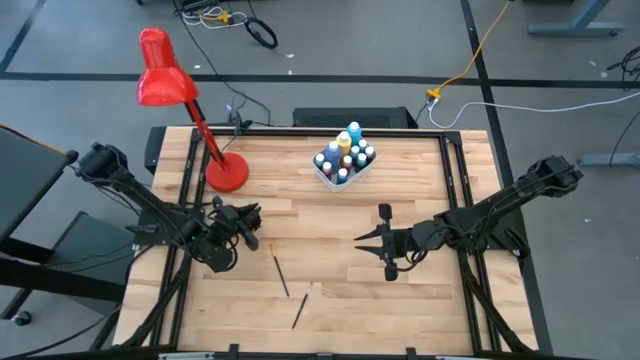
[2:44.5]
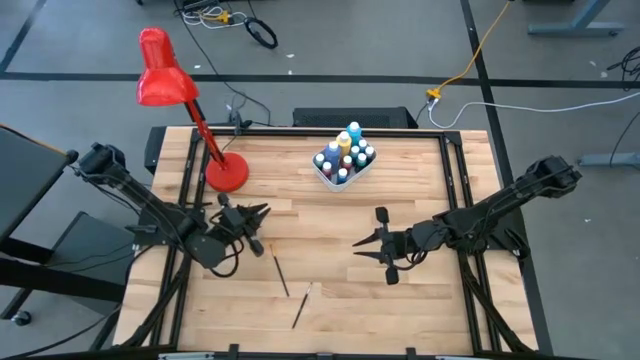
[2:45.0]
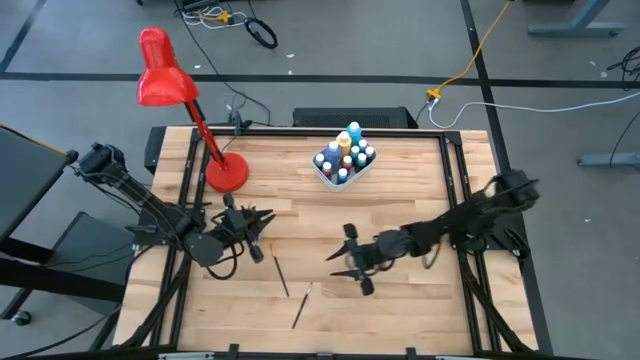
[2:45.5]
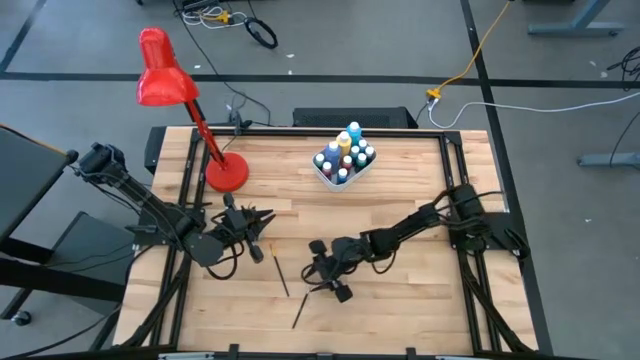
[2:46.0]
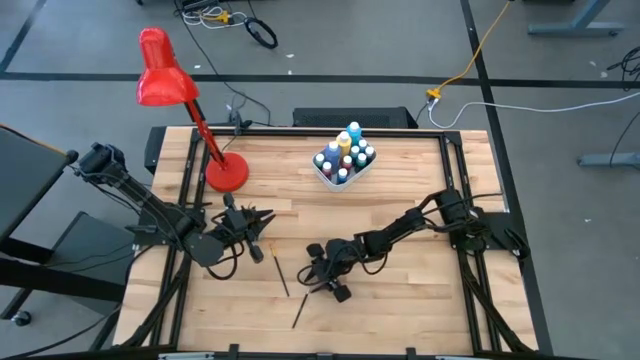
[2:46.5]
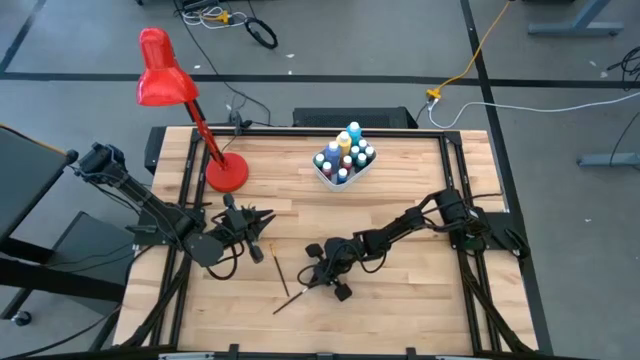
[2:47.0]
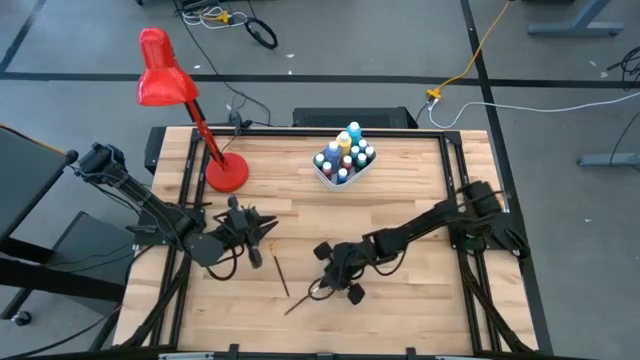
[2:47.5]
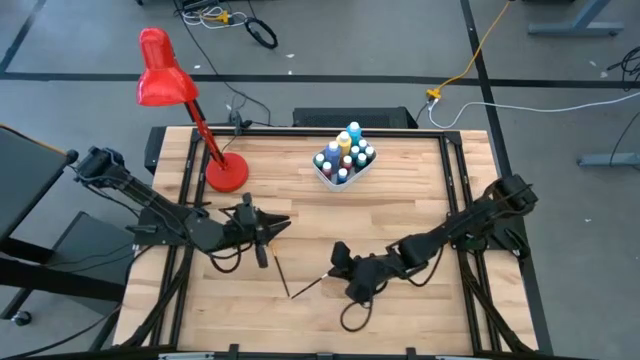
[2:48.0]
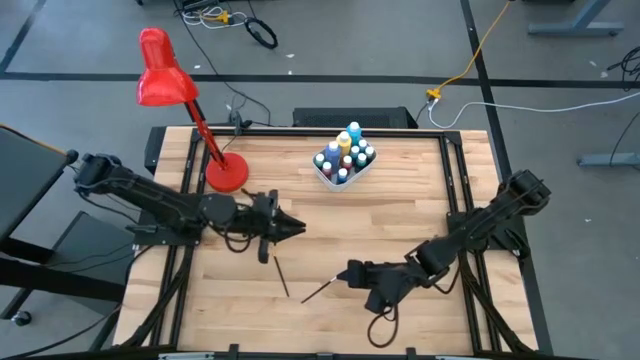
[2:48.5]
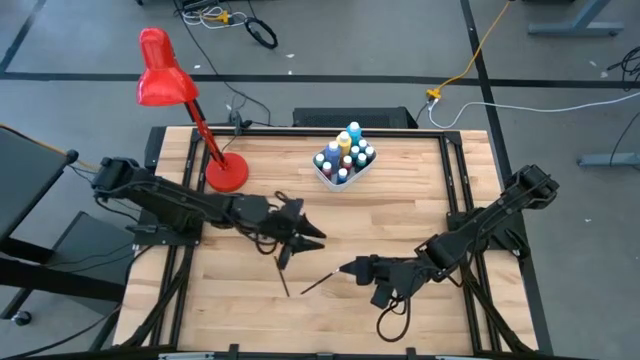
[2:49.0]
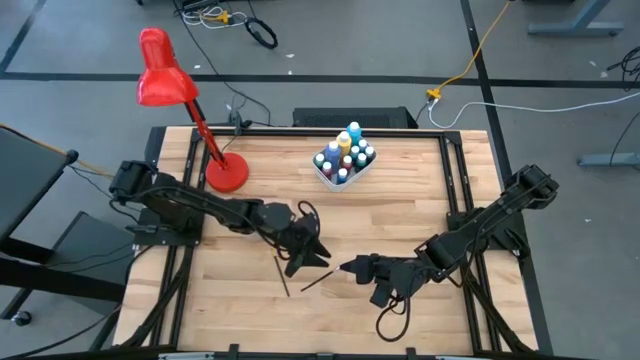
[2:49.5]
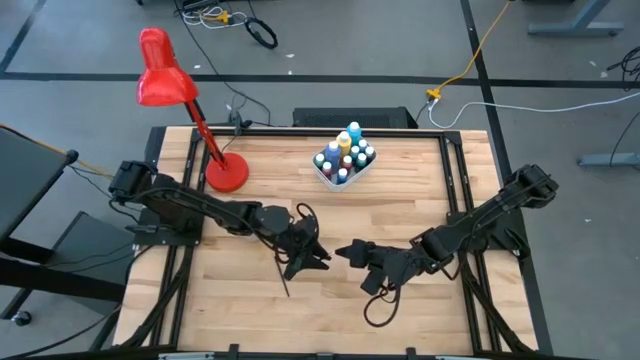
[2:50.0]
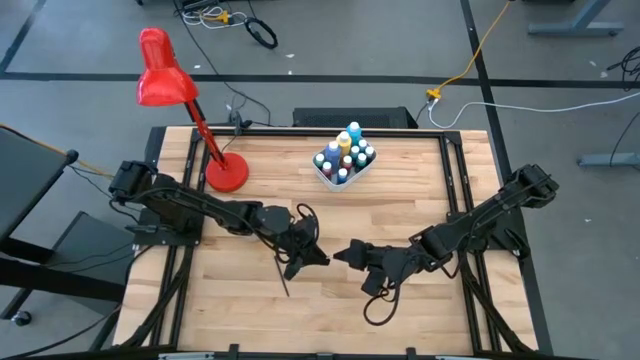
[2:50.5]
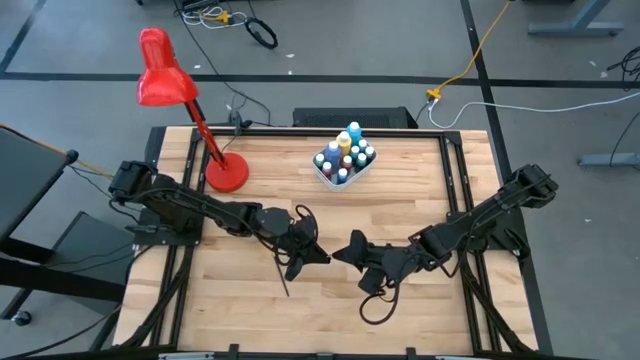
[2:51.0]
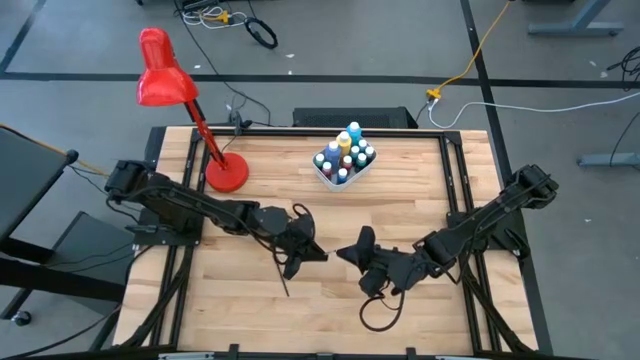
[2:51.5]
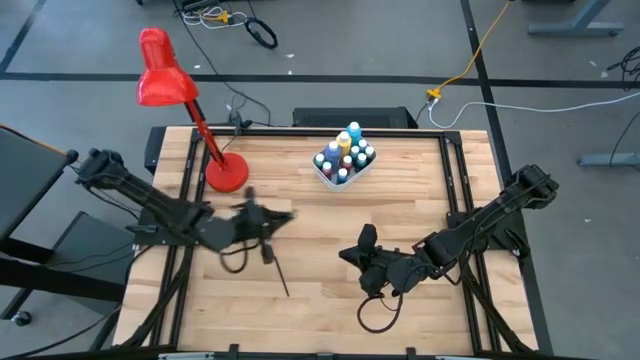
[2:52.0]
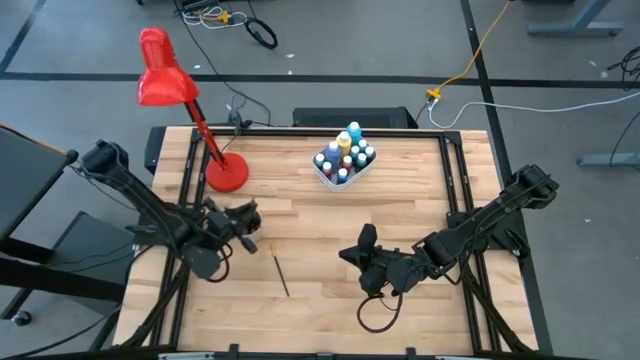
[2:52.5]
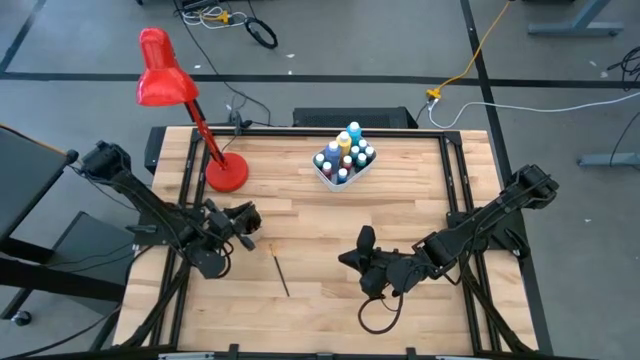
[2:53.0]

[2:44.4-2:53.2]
Task: Pick & Place Paint Supplies
Put the silver paint brush into the white cup

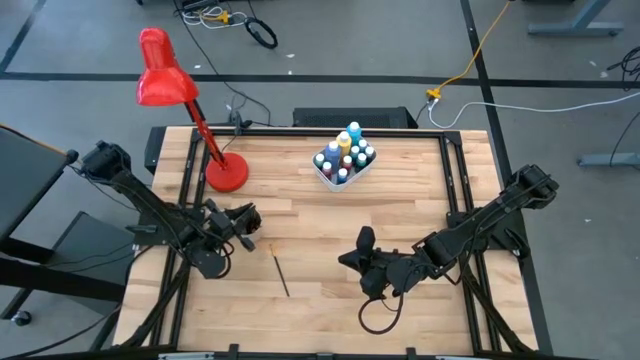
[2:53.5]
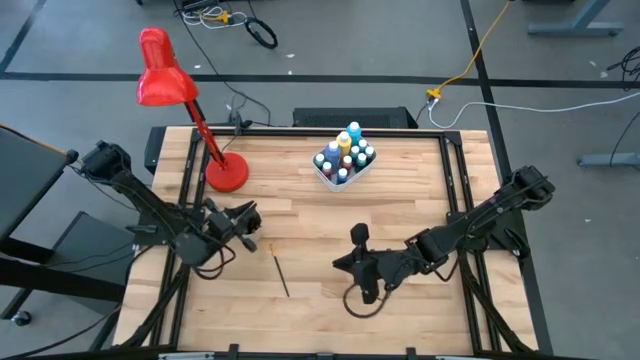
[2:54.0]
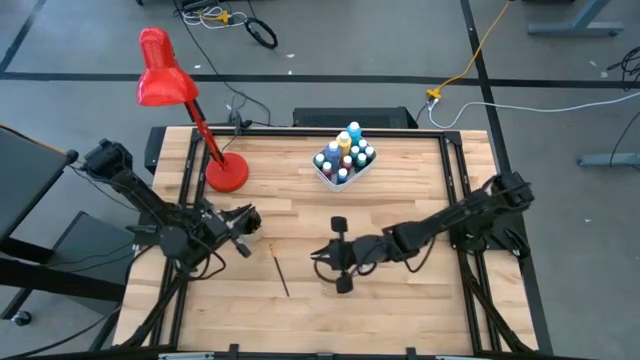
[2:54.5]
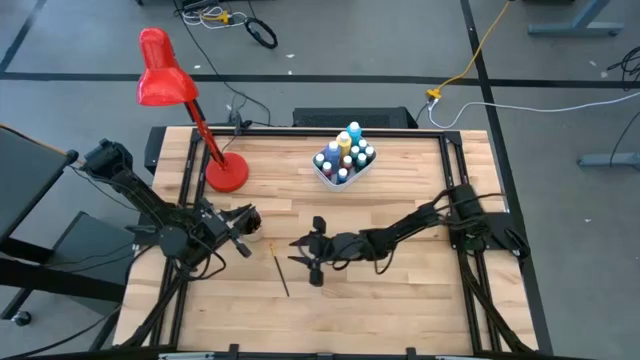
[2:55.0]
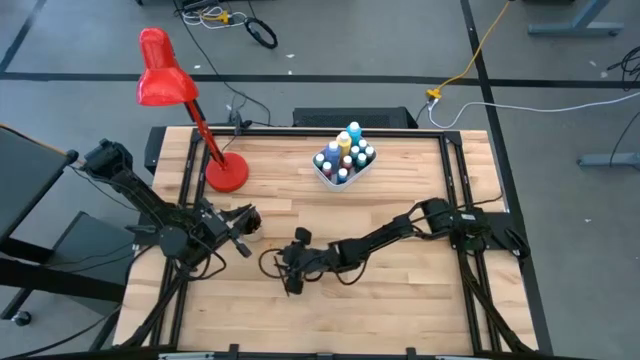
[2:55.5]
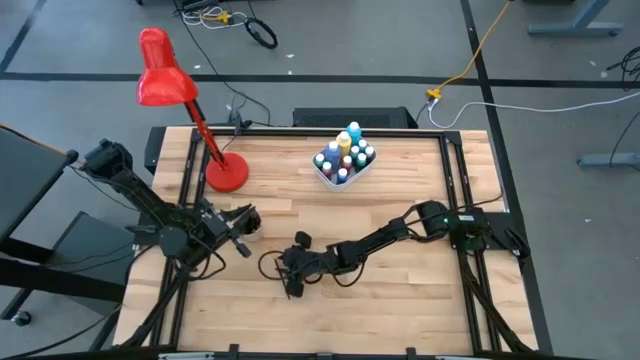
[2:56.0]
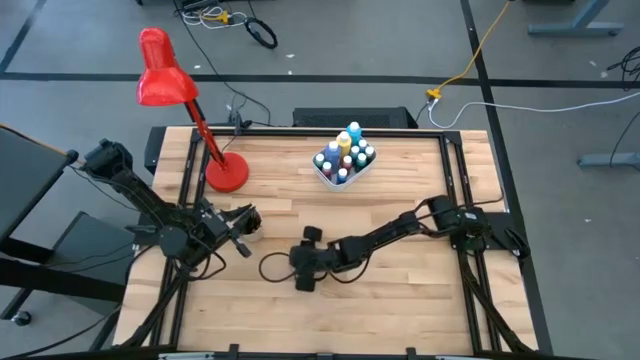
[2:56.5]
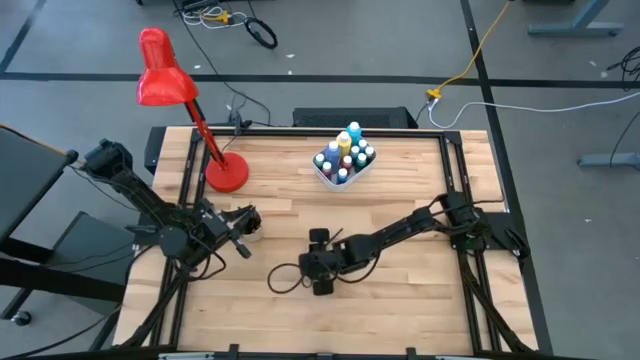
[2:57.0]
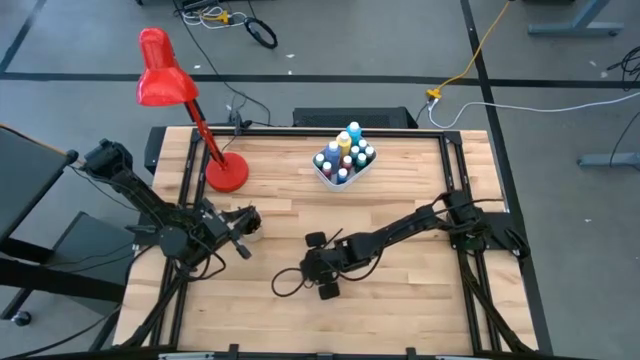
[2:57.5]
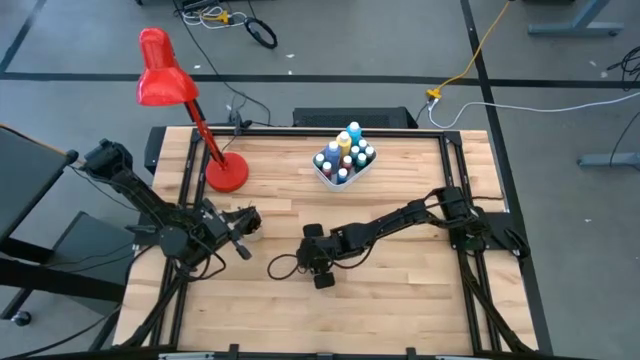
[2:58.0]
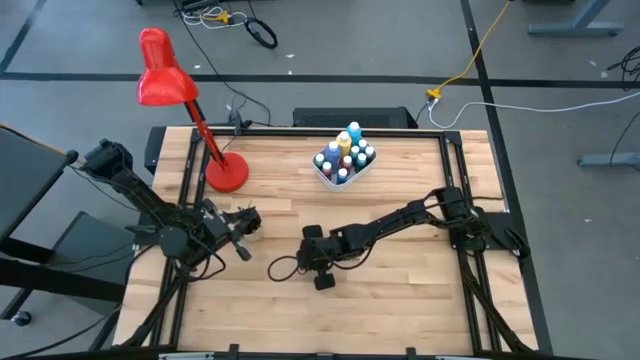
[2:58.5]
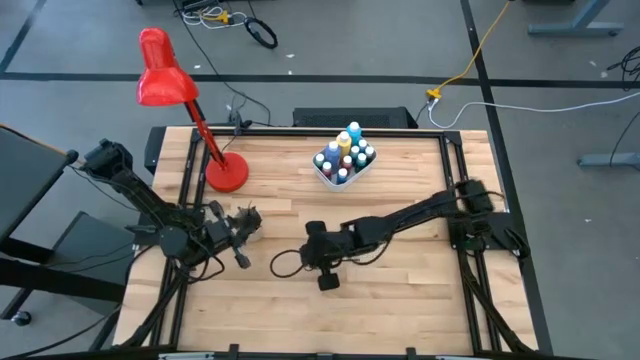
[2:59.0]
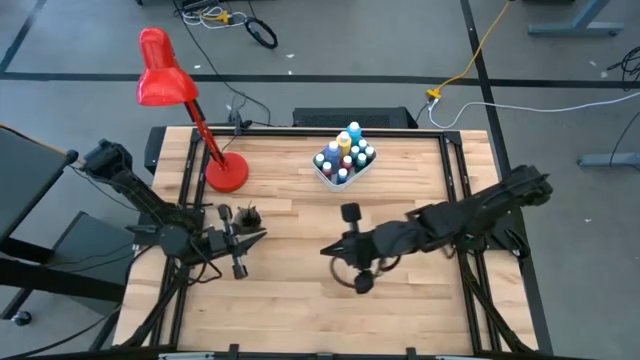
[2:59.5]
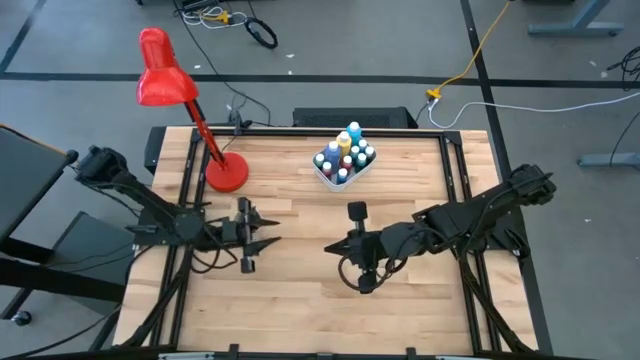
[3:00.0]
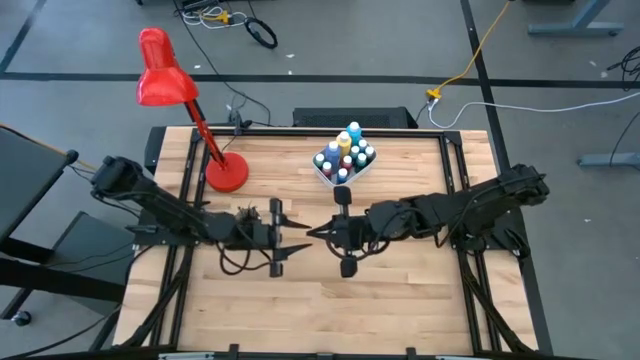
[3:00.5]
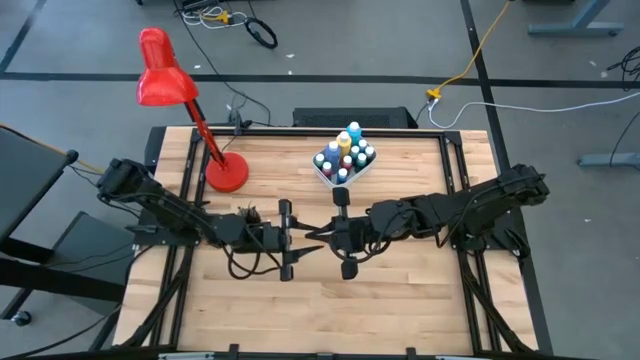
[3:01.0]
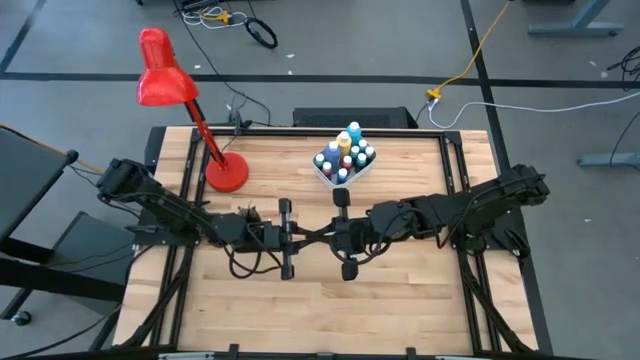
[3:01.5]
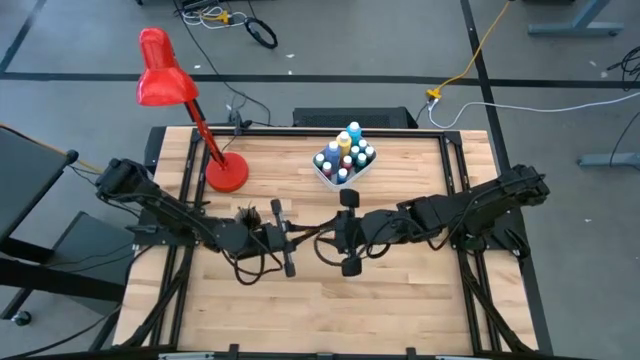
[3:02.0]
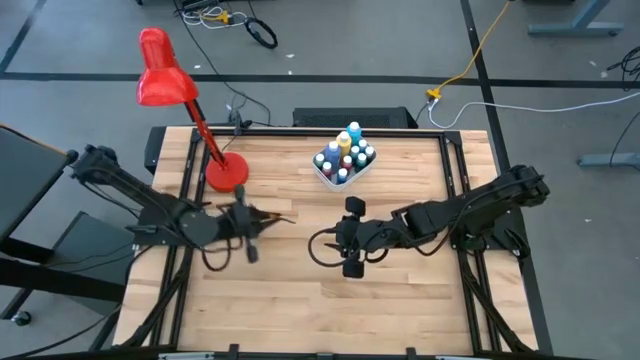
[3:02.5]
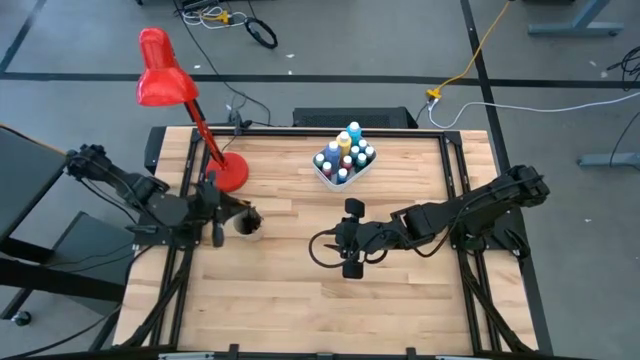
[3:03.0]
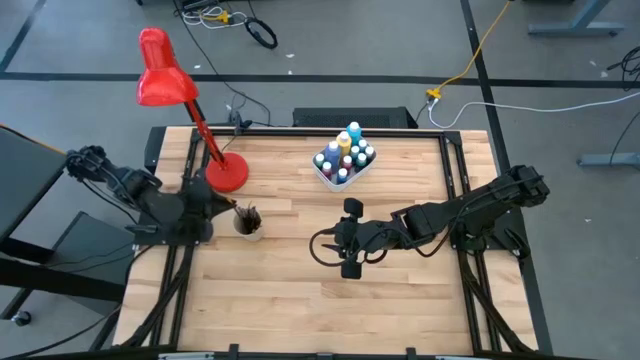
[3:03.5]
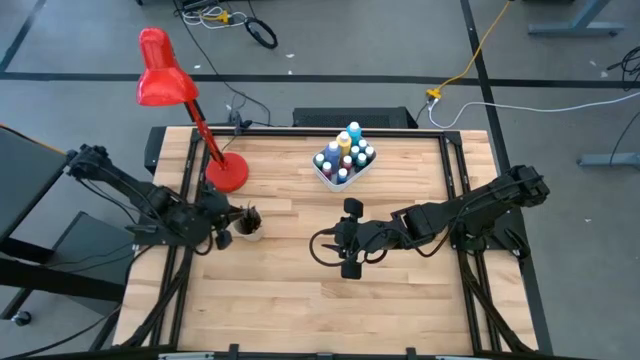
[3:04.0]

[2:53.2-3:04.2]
Put the gold paint brush into the white cup
